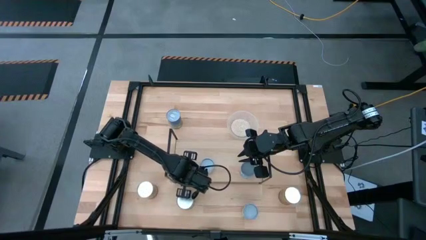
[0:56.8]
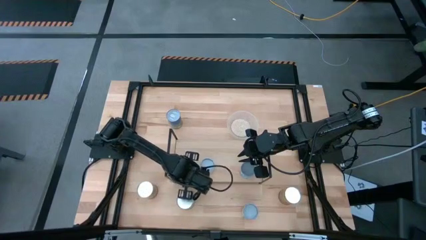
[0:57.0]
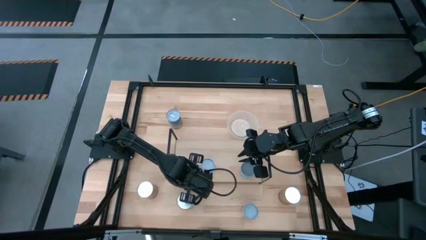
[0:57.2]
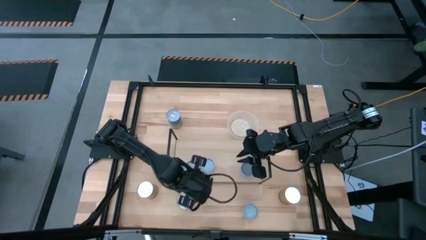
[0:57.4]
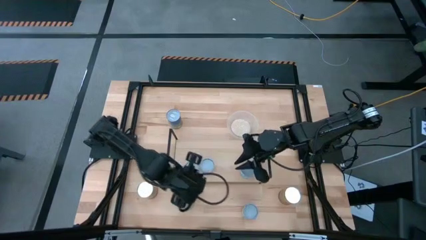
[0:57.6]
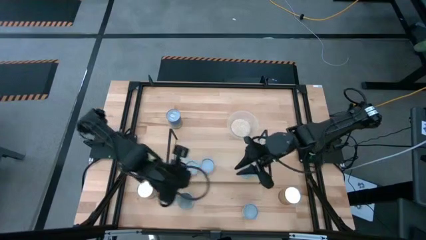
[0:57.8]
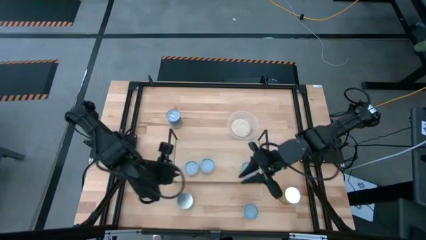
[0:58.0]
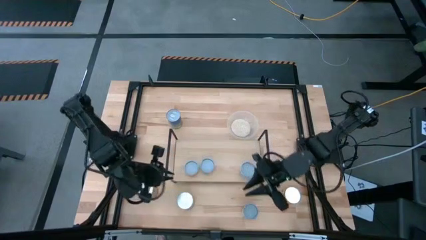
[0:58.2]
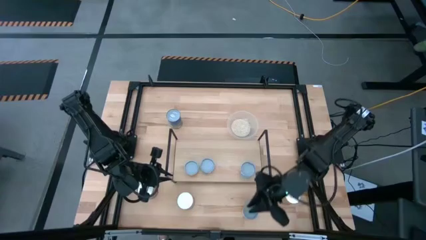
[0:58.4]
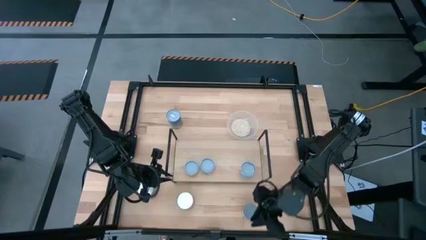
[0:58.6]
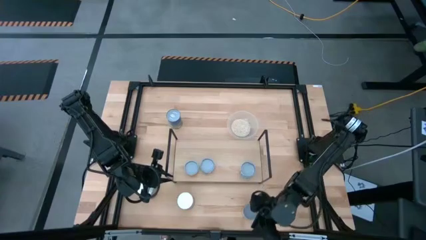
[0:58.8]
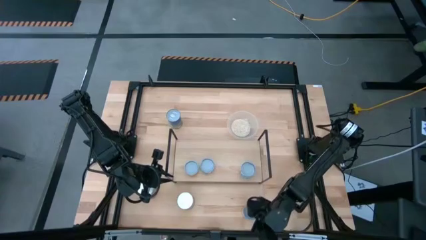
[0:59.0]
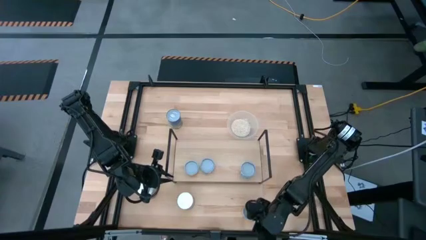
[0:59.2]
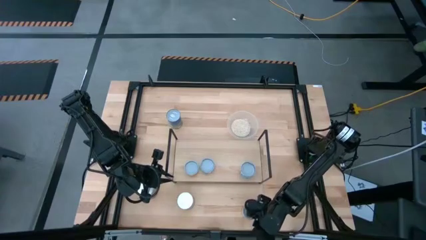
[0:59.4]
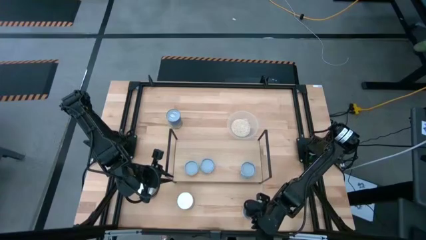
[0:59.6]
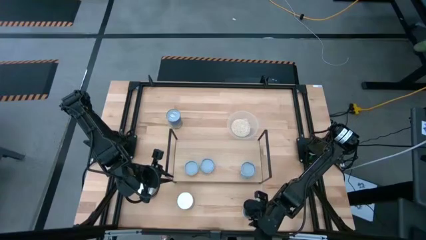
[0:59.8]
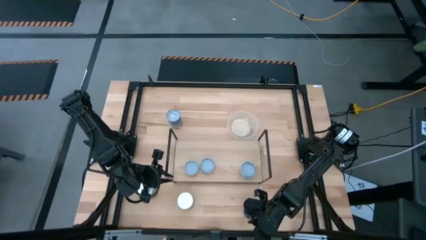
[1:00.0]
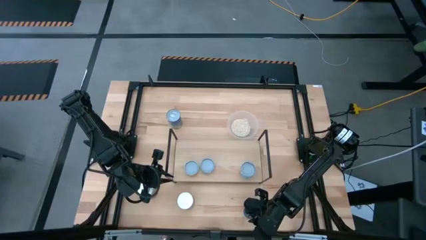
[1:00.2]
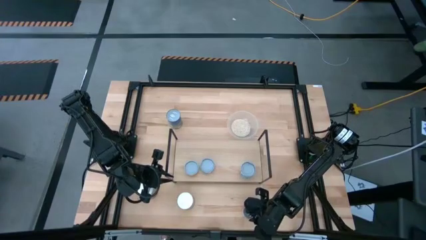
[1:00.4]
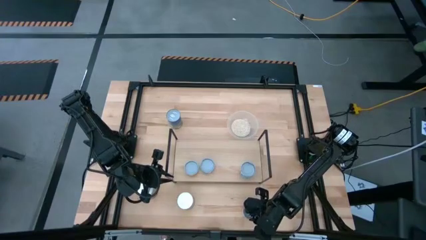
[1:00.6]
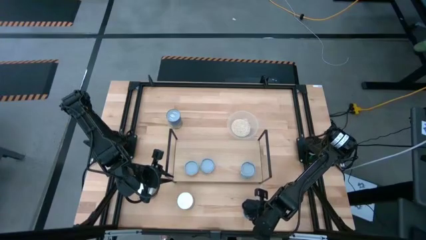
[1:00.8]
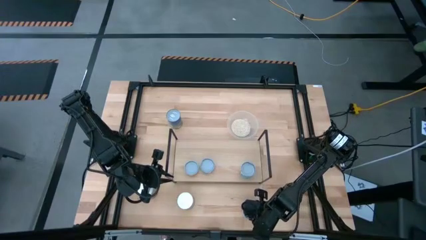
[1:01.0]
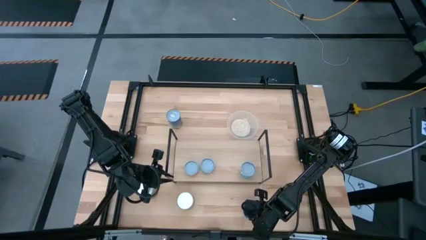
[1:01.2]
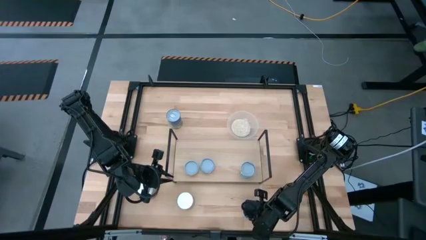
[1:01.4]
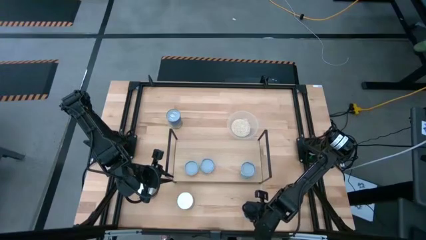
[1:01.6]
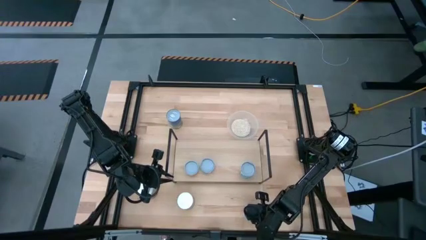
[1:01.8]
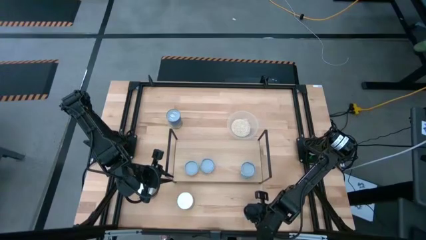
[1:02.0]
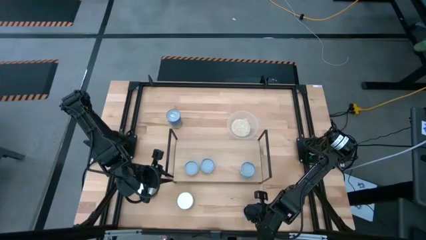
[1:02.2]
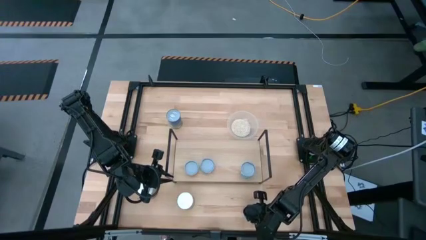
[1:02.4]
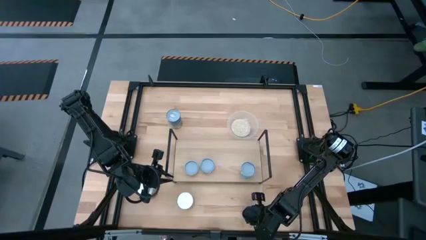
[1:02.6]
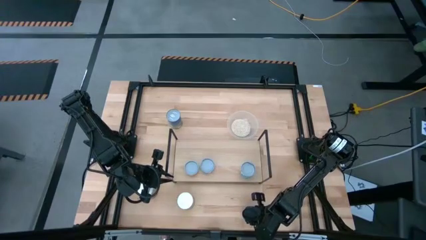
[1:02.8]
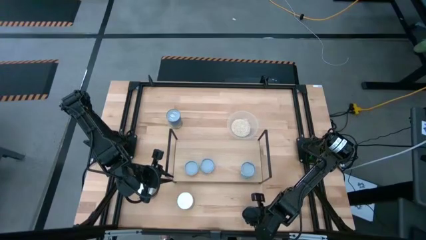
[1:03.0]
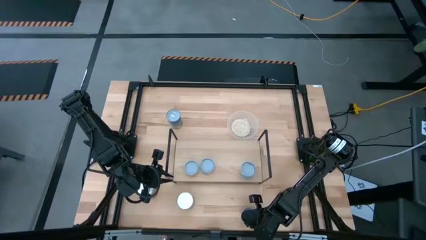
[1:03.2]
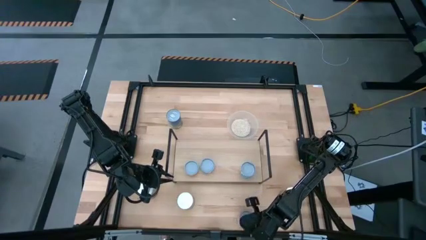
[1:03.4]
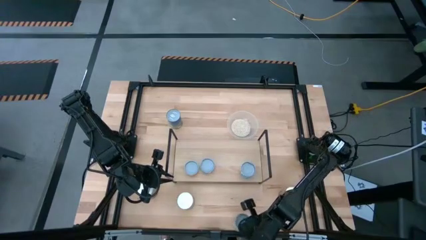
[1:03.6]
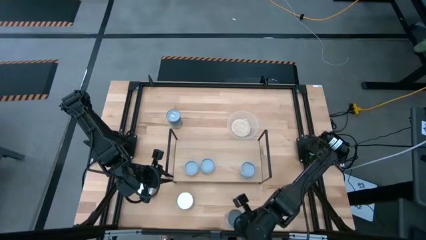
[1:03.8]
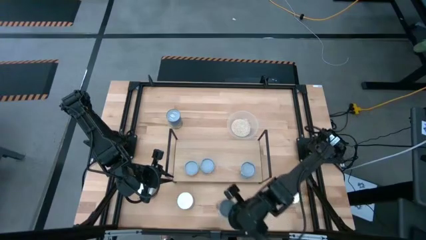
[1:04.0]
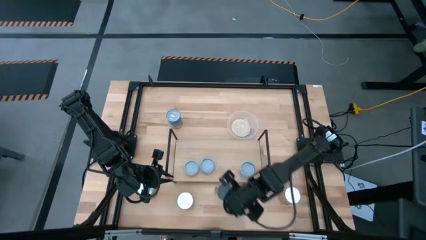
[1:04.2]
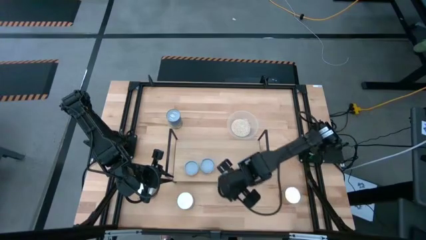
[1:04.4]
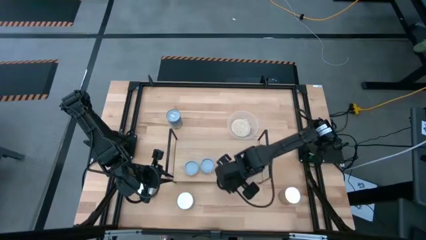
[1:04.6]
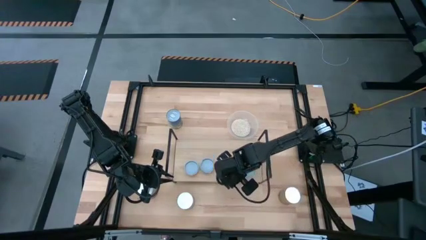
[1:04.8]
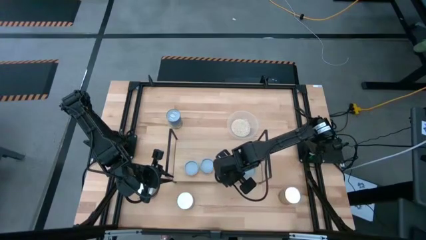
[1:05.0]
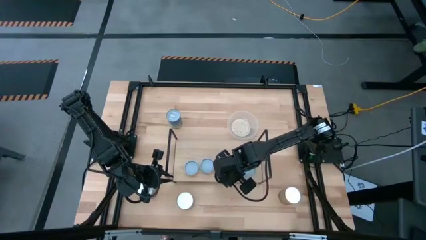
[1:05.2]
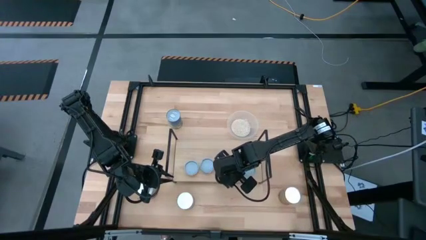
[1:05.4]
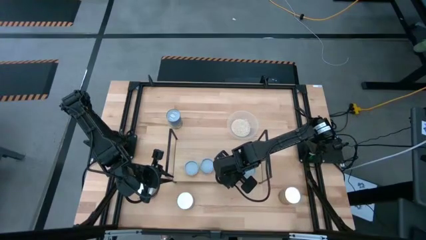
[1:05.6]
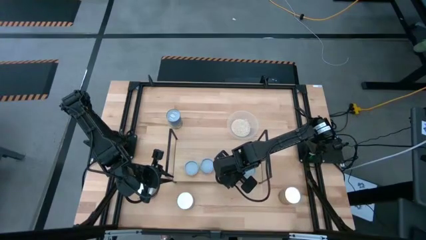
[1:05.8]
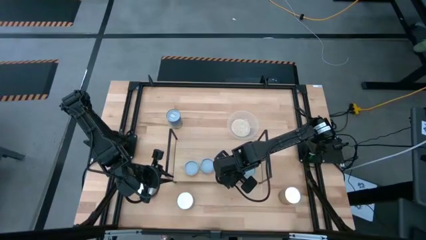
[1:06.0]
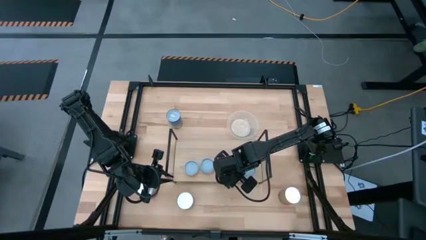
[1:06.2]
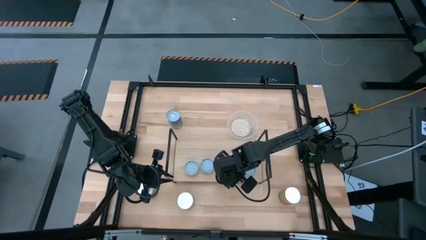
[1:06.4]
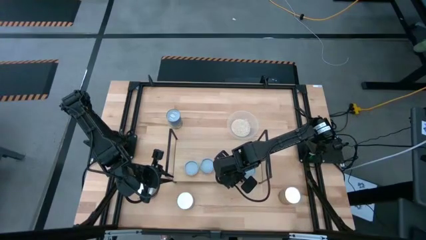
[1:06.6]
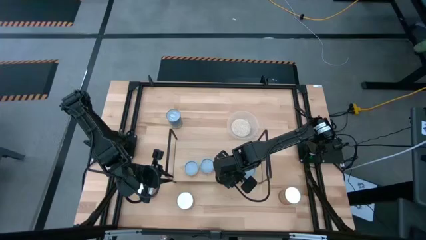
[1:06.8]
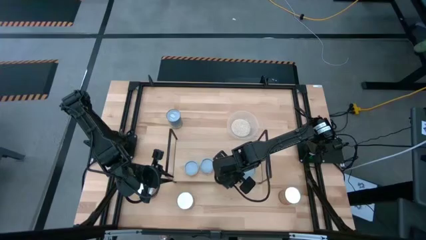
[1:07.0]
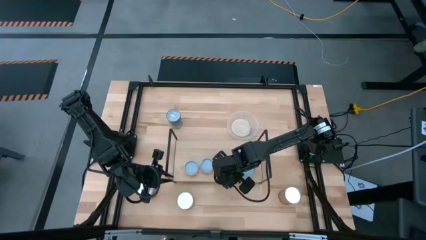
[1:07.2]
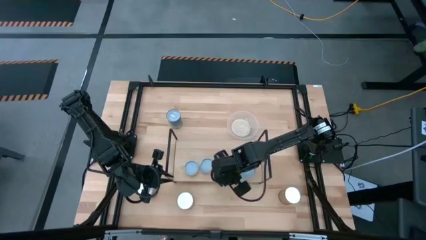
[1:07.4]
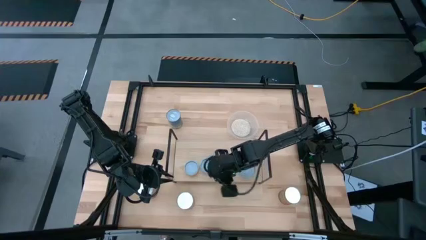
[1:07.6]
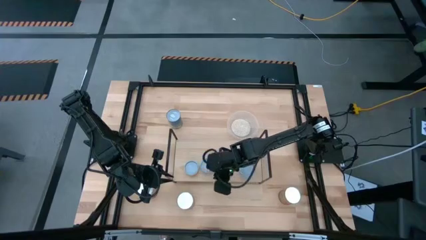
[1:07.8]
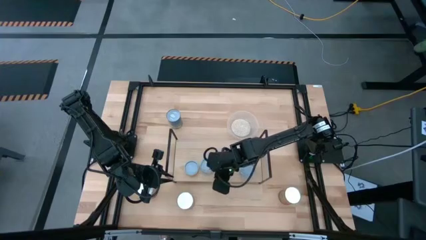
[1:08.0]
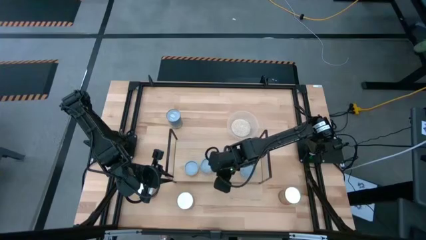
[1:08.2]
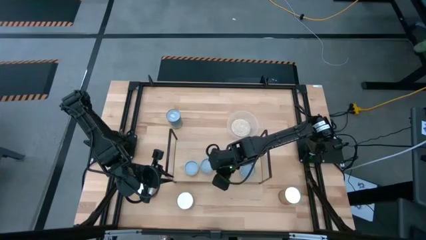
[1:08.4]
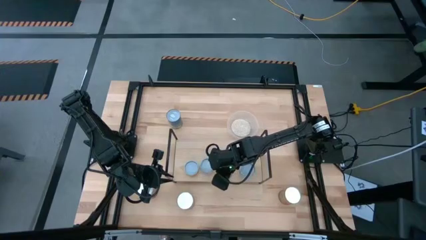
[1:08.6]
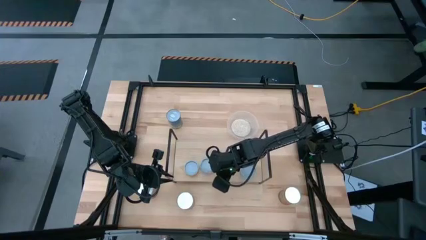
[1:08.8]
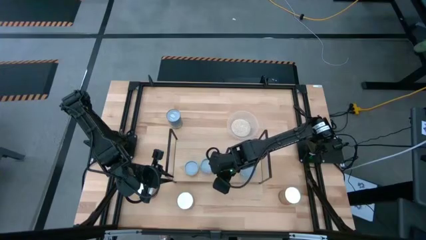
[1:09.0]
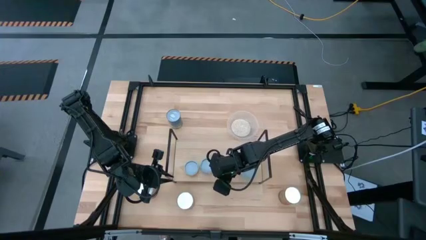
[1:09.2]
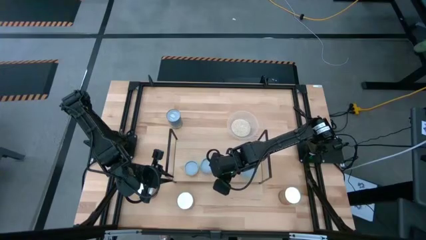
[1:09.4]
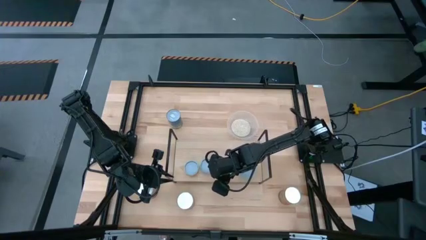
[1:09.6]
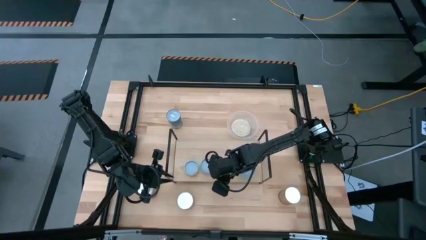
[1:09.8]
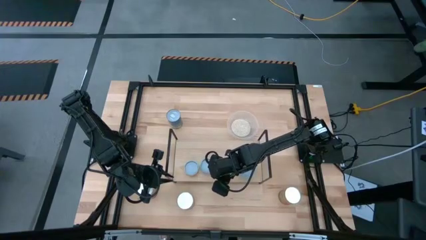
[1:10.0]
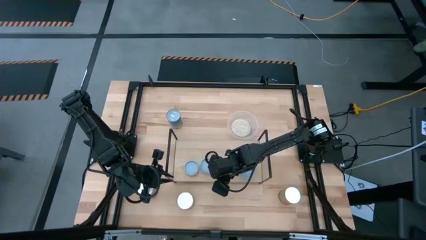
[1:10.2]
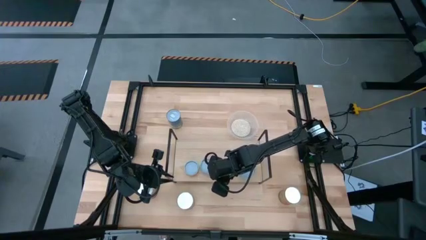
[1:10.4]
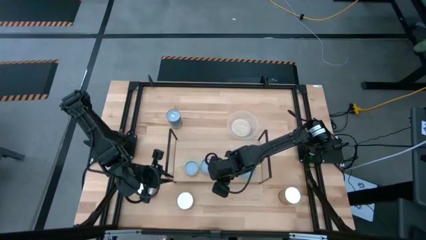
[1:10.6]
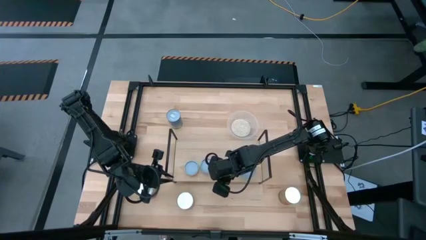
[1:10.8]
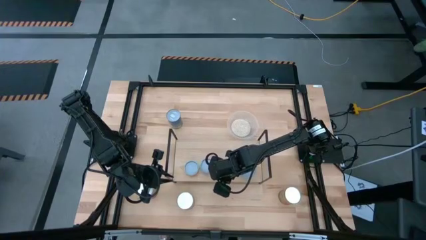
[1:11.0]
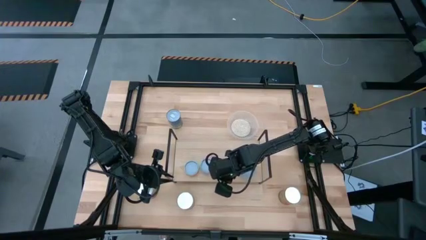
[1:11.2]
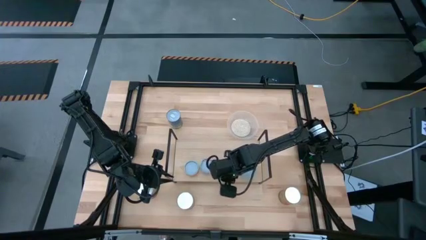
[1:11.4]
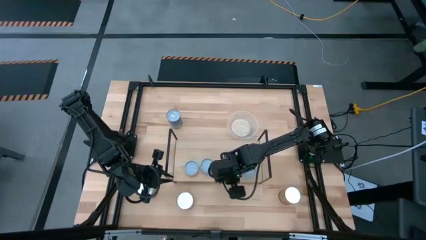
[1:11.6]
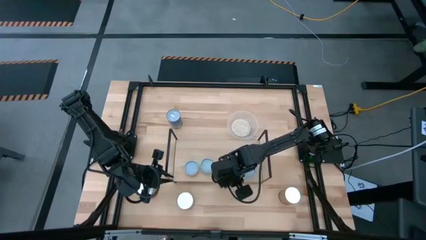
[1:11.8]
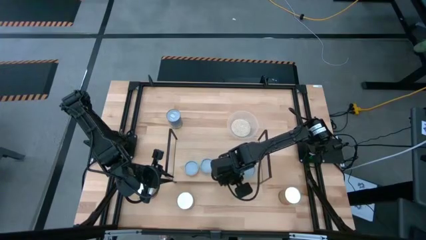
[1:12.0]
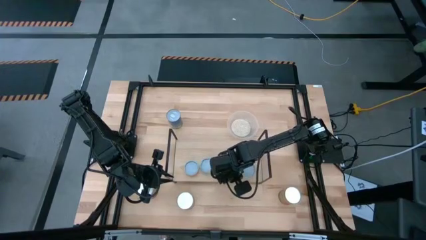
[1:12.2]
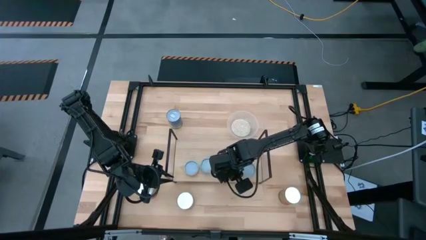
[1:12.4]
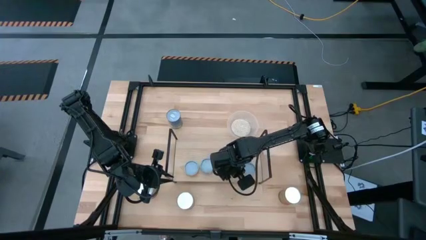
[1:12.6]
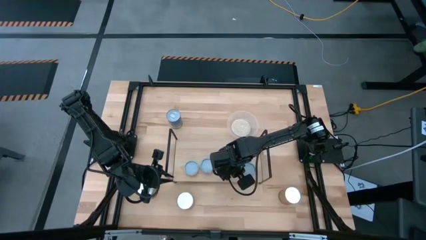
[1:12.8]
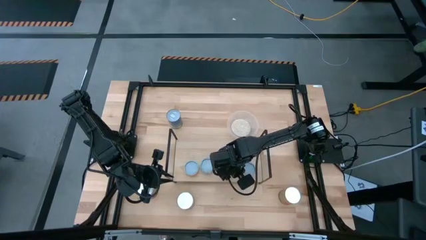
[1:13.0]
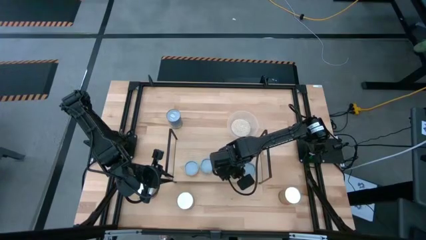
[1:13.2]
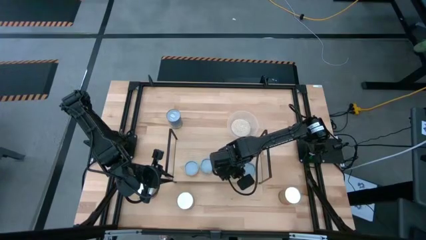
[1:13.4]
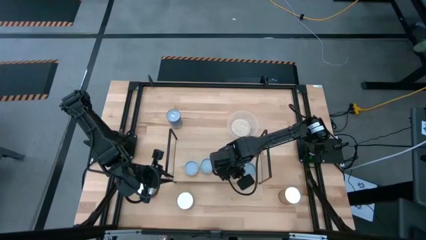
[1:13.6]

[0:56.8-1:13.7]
Task: Pick and place cans onto a shelf
Put the canned oranges on the shelf
